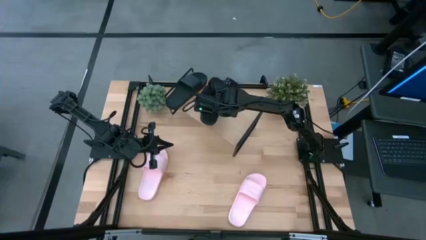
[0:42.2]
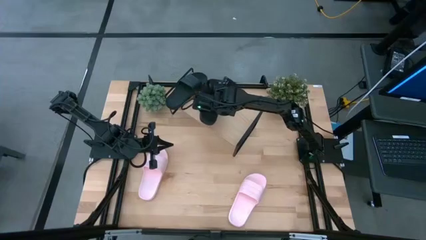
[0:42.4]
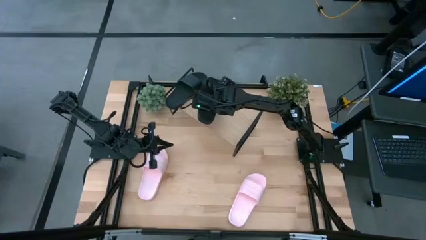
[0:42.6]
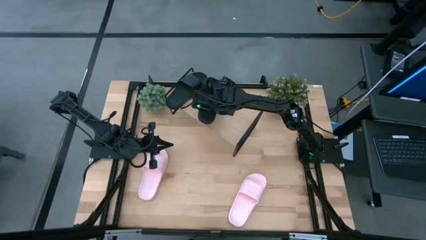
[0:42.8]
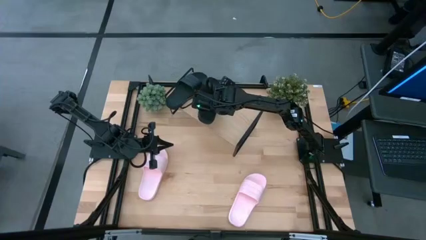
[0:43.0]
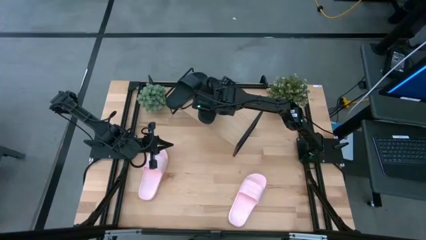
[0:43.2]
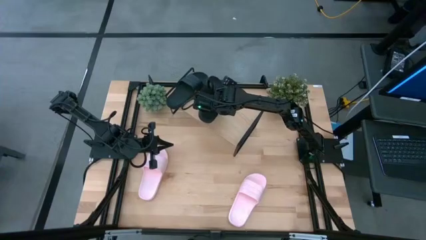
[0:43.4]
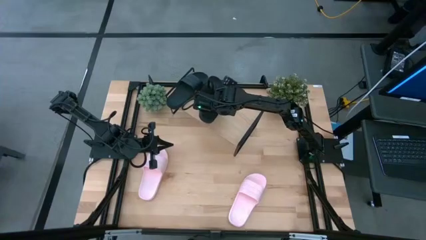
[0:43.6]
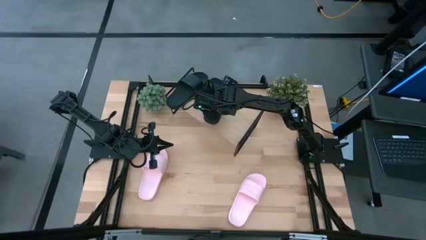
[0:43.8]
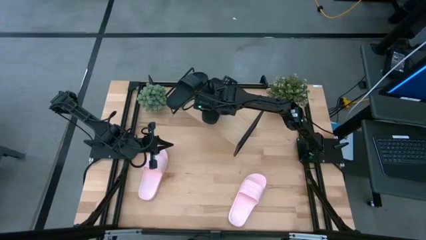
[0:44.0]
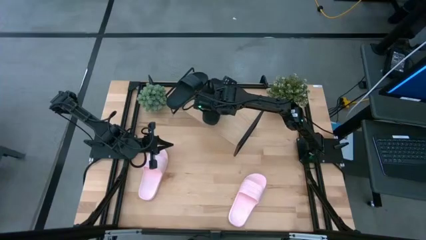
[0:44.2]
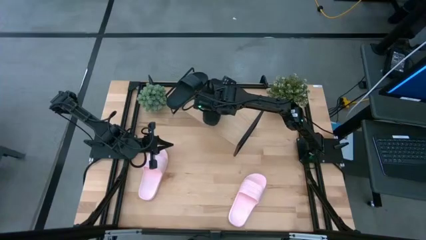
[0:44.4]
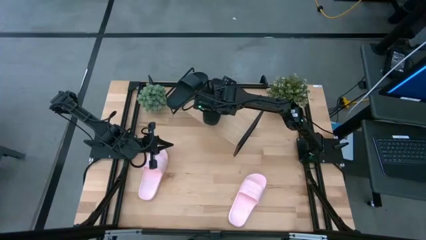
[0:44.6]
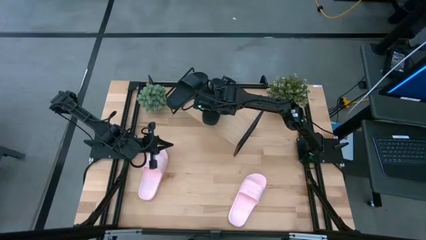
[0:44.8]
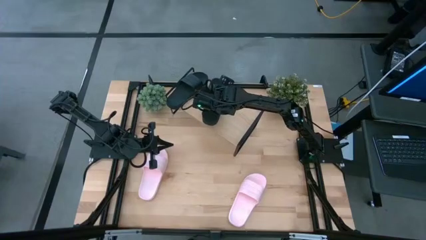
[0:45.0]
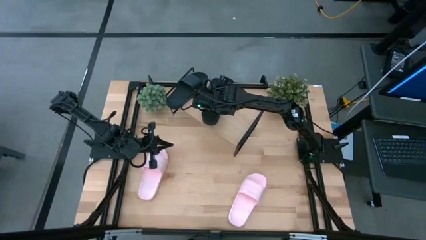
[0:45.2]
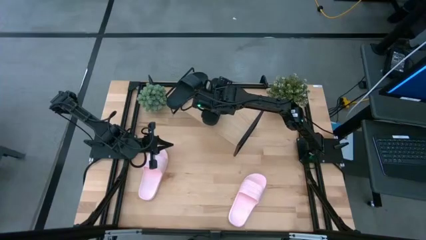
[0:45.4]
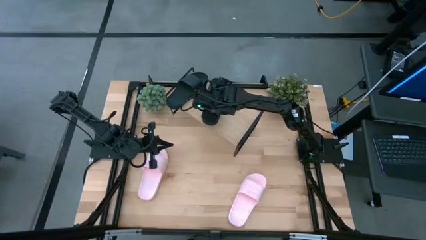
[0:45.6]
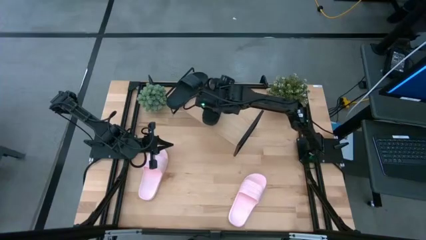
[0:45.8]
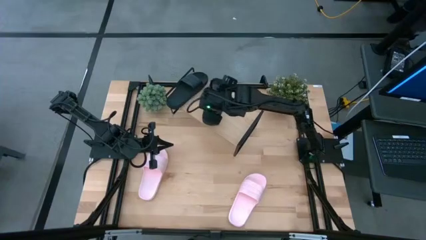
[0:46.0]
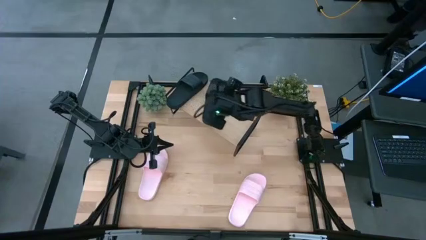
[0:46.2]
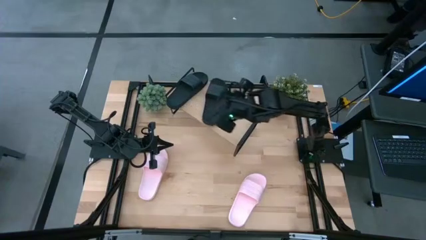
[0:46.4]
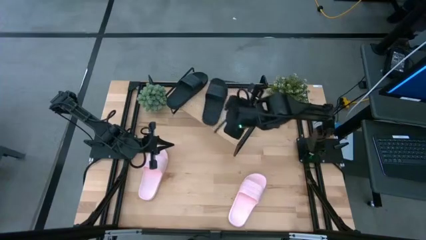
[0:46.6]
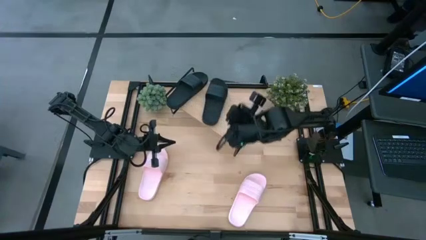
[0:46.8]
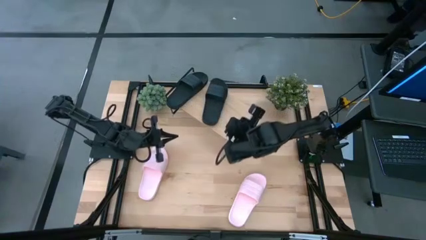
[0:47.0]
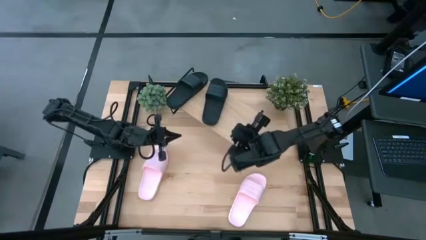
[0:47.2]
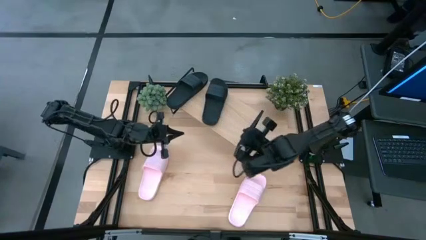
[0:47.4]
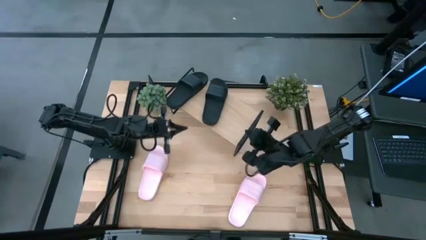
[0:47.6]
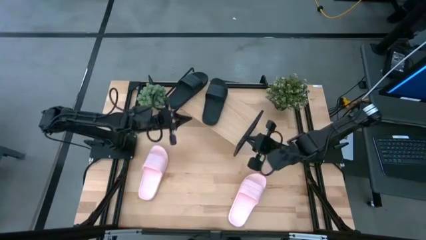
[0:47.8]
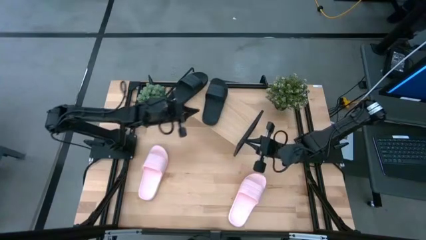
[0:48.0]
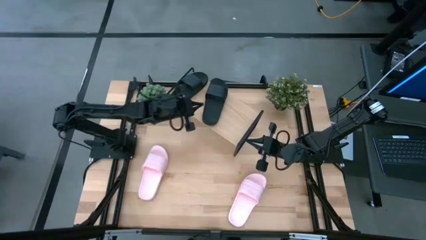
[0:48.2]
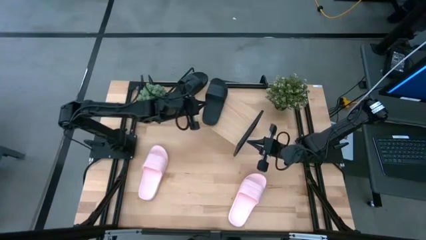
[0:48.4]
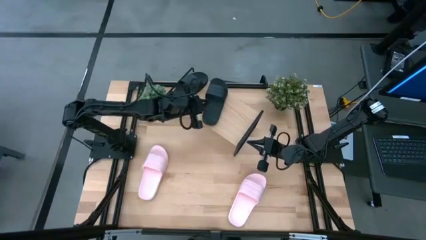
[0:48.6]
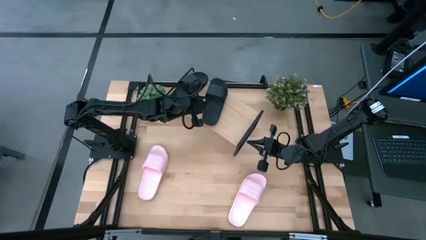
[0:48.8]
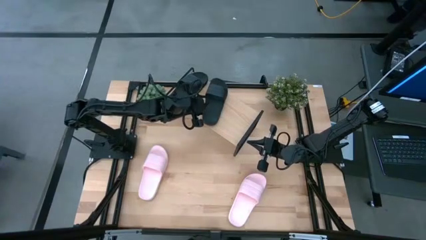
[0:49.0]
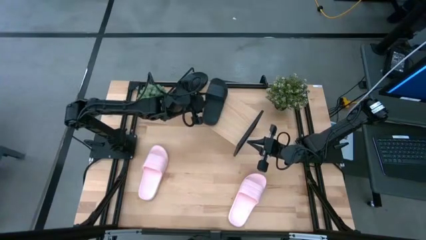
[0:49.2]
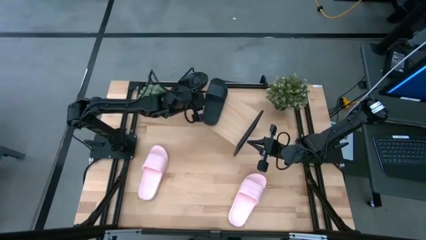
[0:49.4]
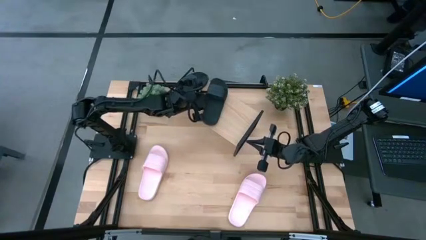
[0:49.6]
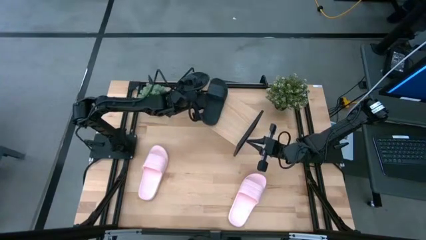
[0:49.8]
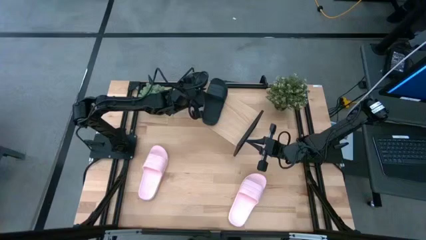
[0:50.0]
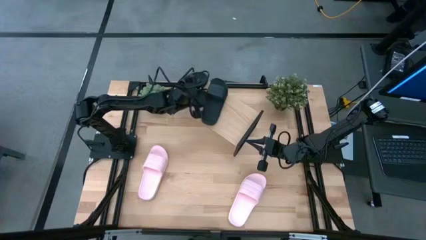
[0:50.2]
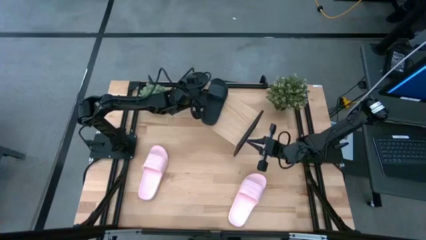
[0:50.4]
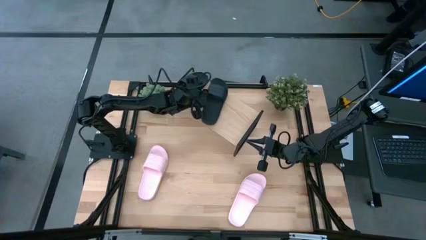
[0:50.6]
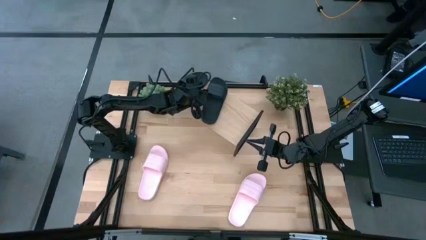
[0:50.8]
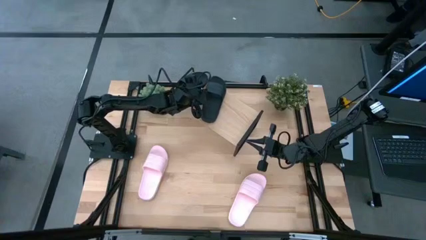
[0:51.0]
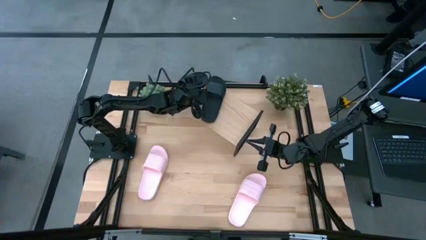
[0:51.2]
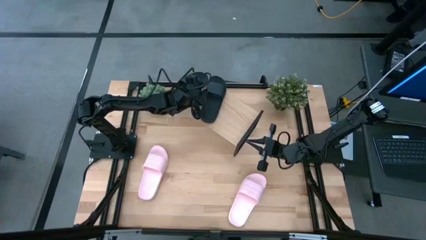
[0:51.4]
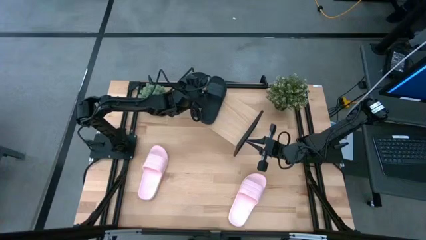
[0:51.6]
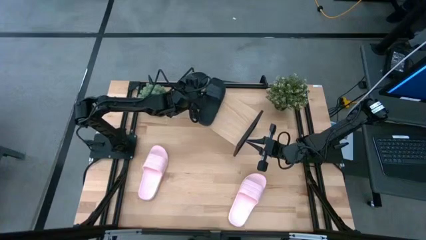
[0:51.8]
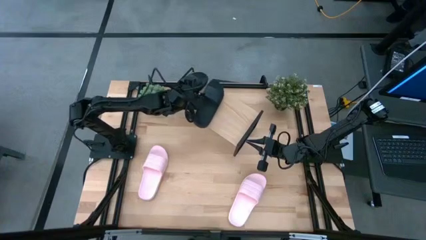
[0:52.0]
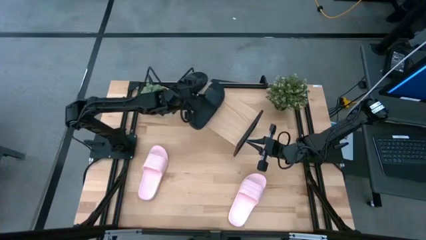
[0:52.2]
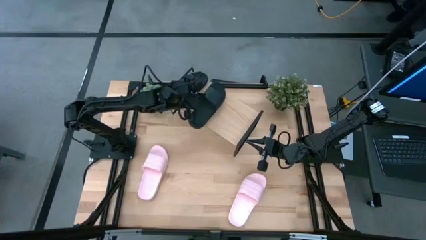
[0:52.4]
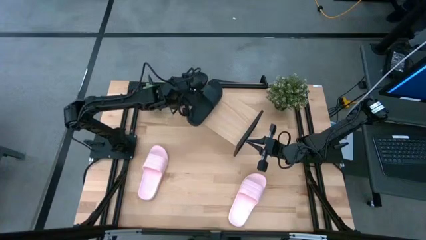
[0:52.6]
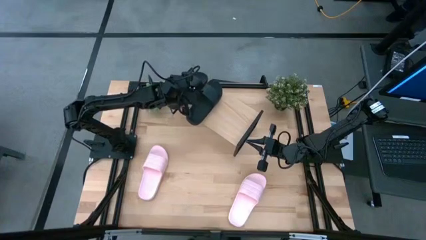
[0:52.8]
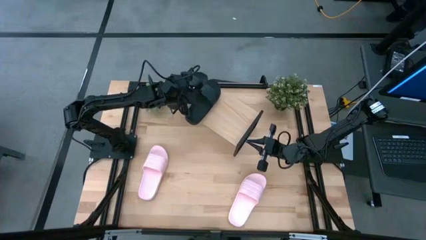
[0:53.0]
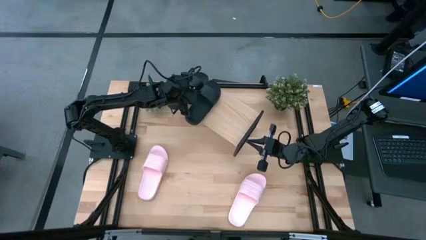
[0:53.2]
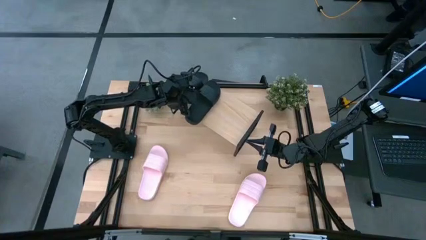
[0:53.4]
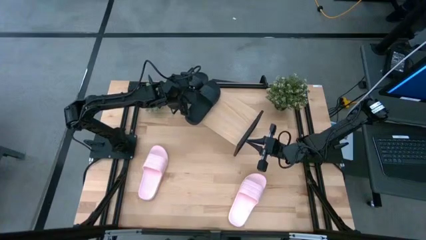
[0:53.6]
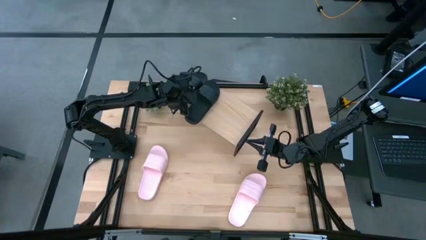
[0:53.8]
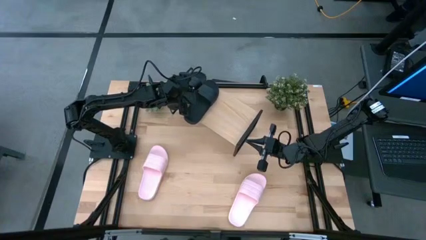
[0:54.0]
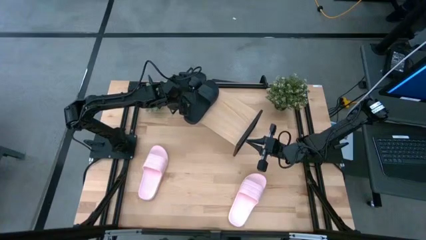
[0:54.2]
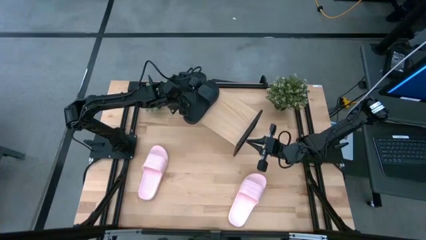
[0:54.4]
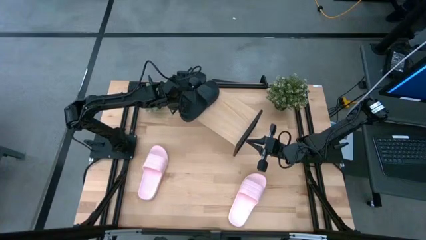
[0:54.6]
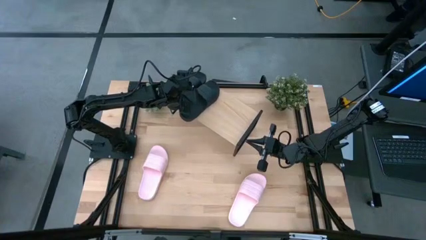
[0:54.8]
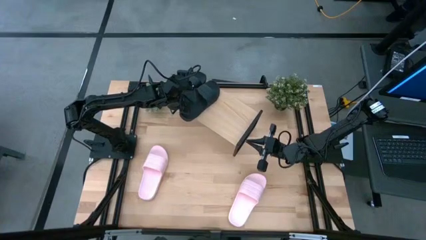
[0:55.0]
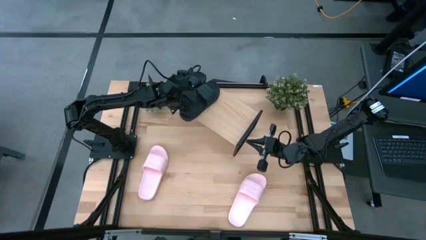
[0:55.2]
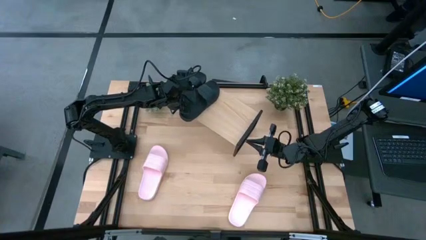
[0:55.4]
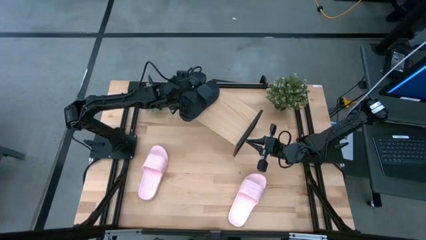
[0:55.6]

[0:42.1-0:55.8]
Task: Pick and place slides into the shelf
Put the black slide on the shelf
